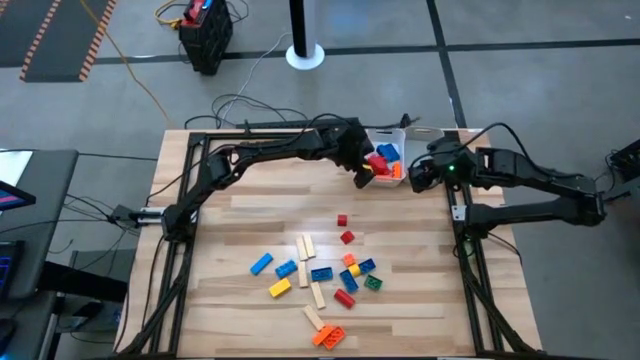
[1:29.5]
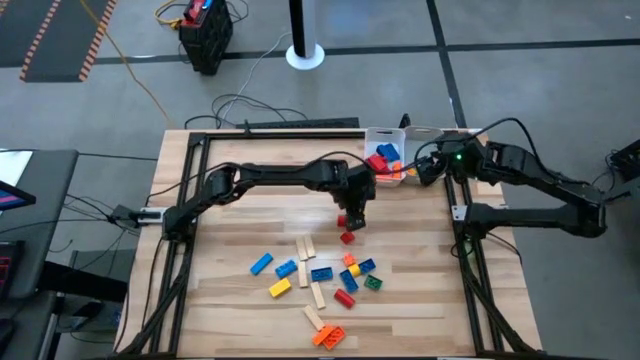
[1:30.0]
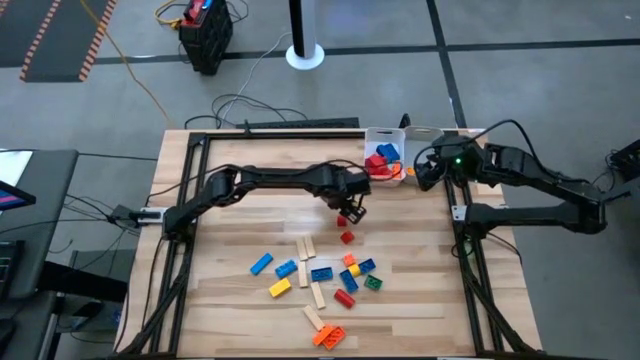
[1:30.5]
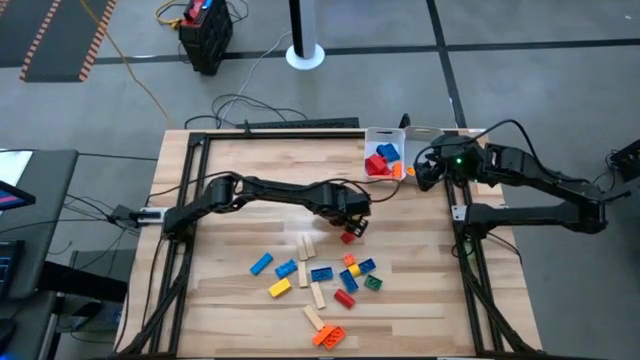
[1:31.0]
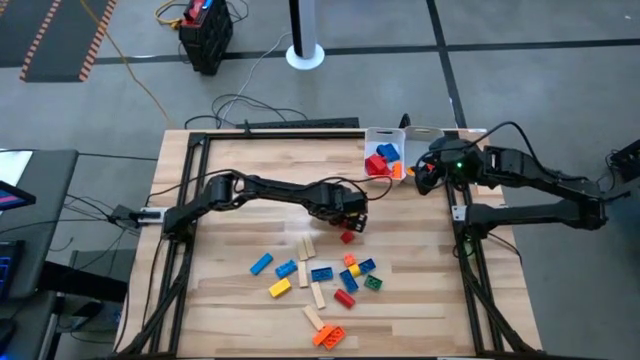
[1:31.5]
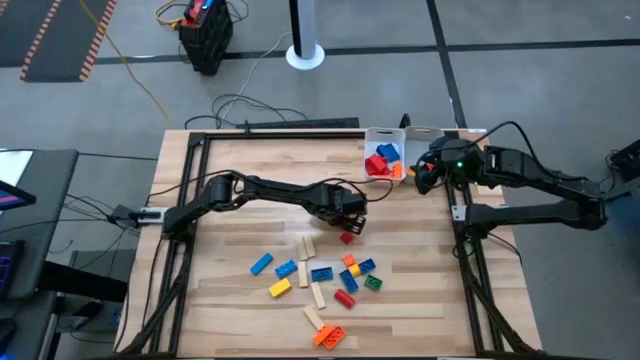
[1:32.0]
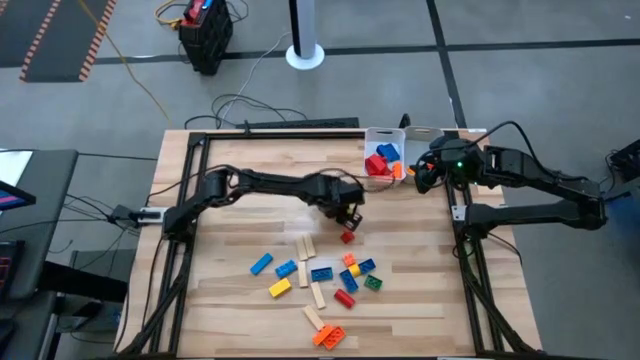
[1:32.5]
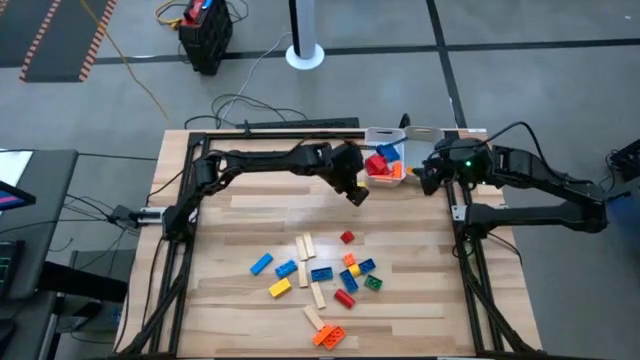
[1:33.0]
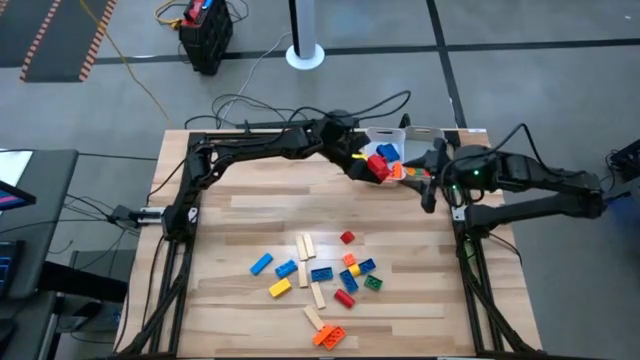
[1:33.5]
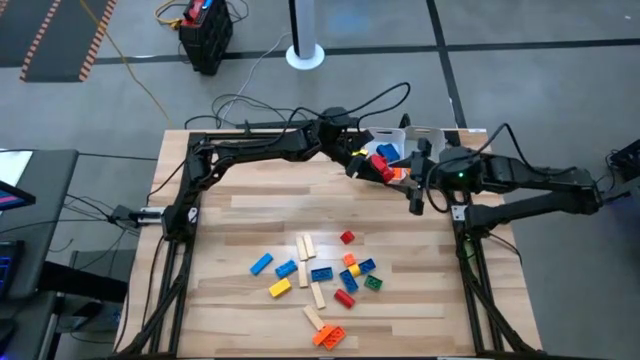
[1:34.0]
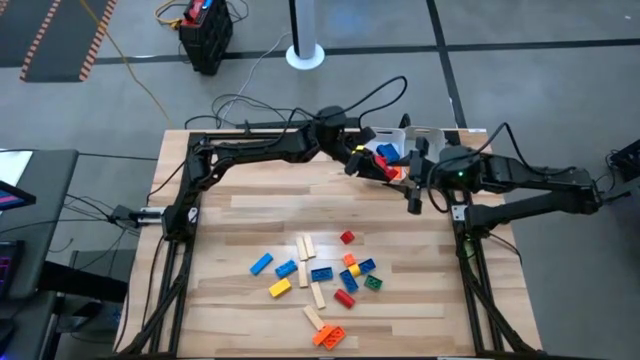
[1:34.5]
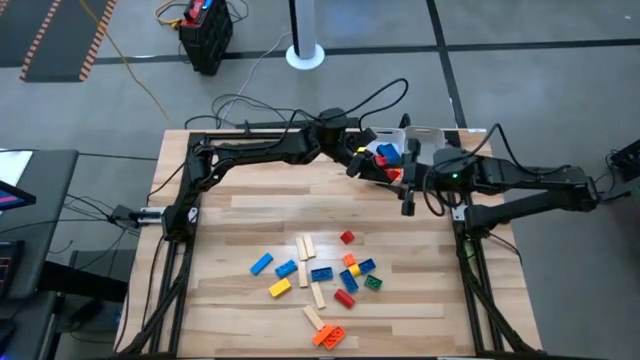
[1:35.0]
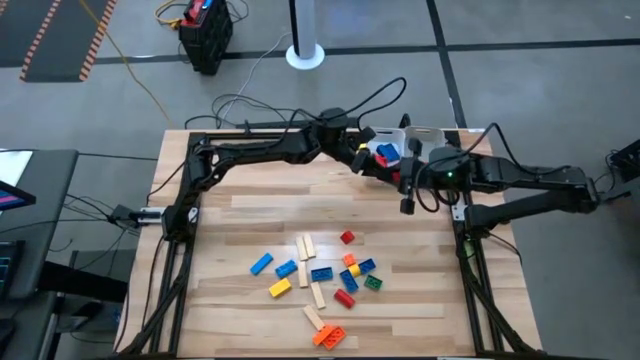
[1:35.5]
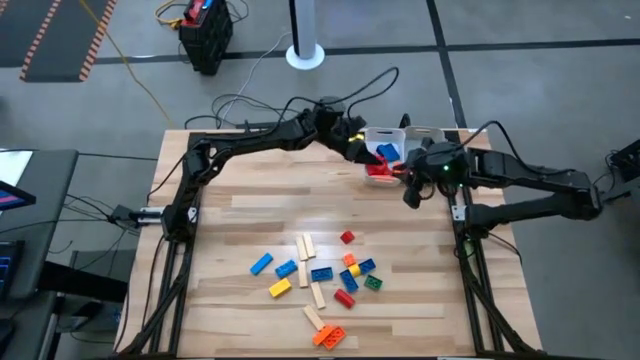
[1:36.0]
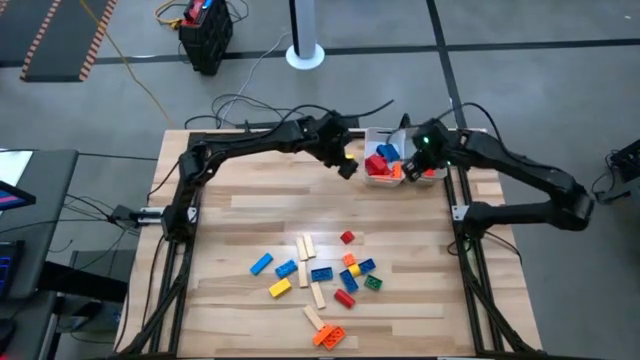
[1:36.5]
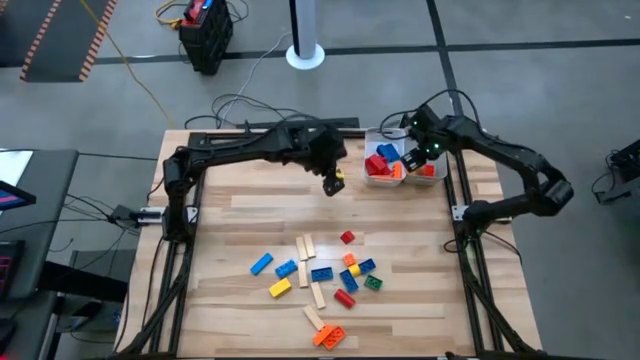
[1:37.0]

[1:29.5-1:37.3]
Task: Sort blocks by size
Put the small red semi circular wooden block into the gray bin

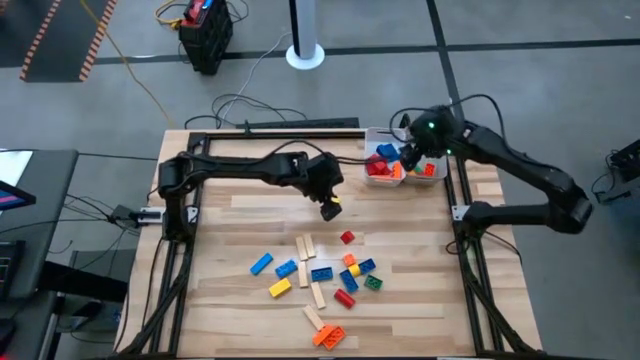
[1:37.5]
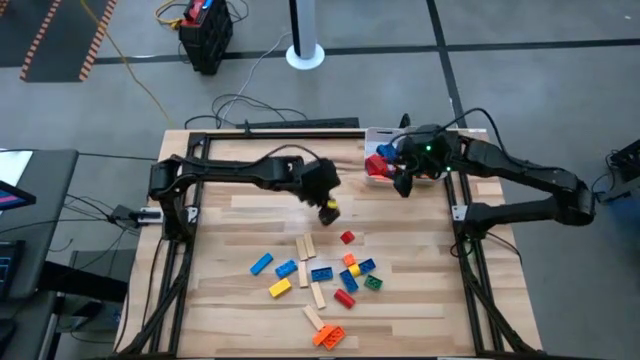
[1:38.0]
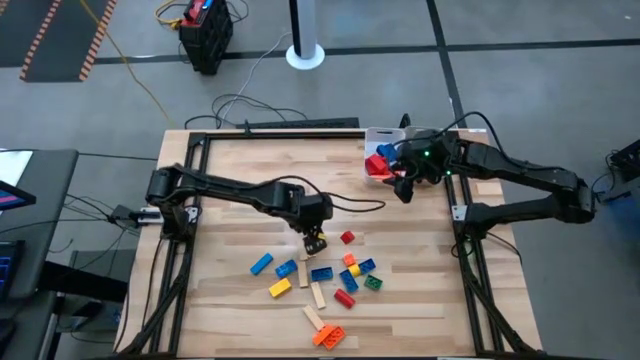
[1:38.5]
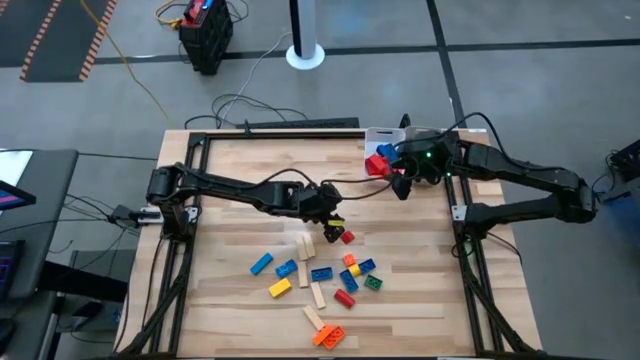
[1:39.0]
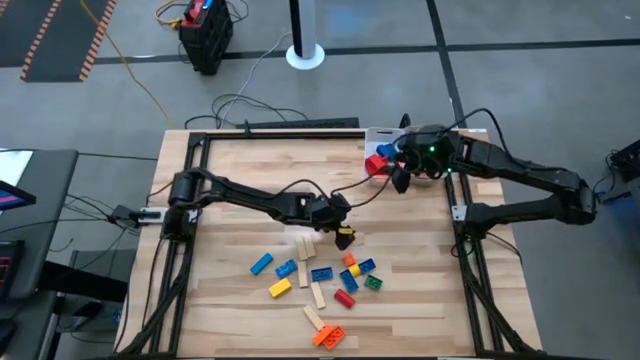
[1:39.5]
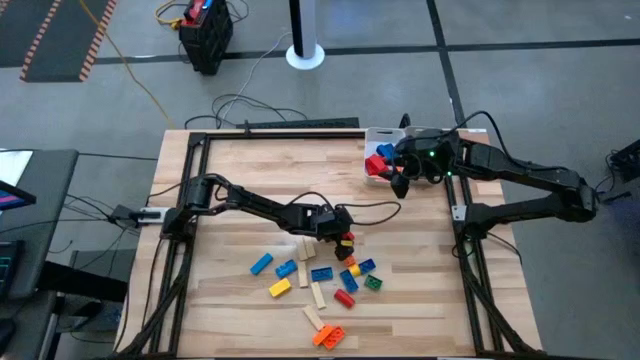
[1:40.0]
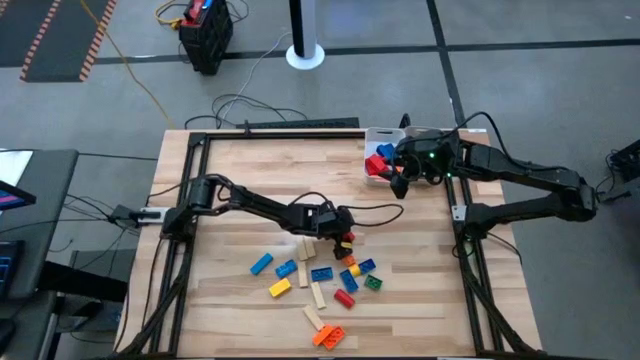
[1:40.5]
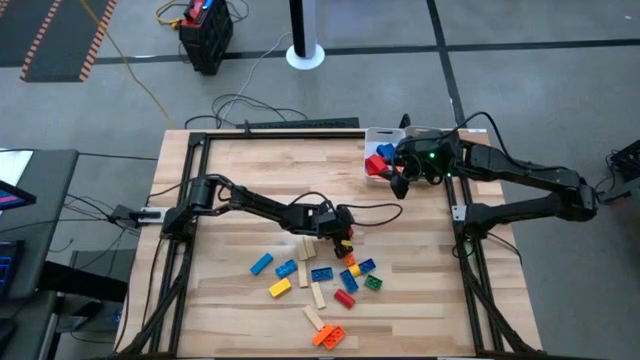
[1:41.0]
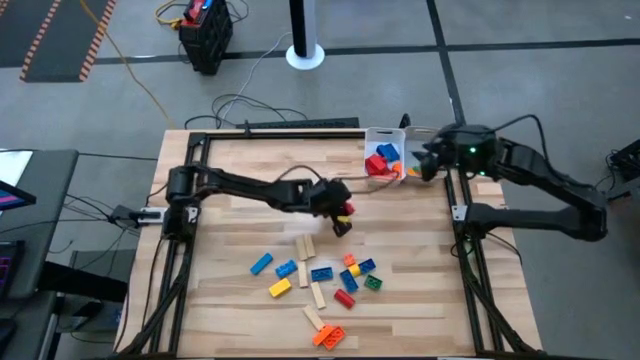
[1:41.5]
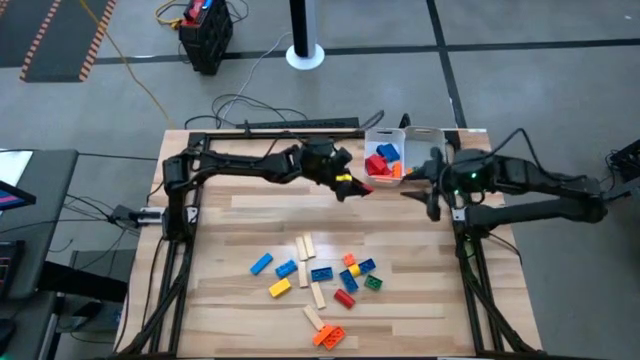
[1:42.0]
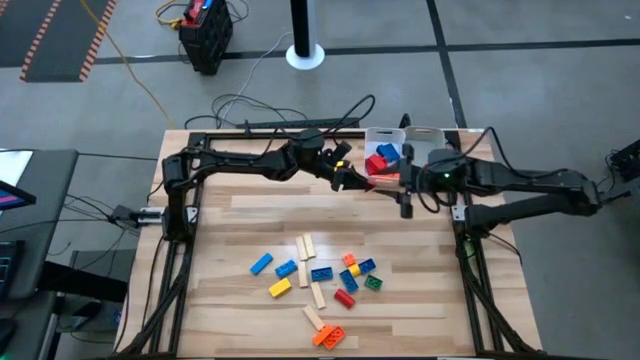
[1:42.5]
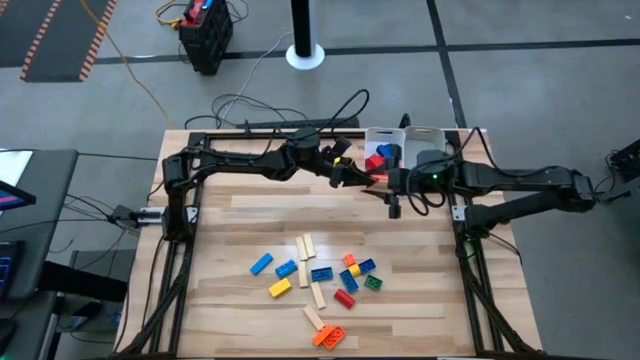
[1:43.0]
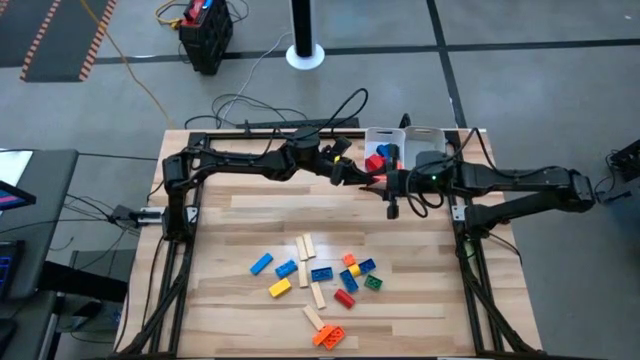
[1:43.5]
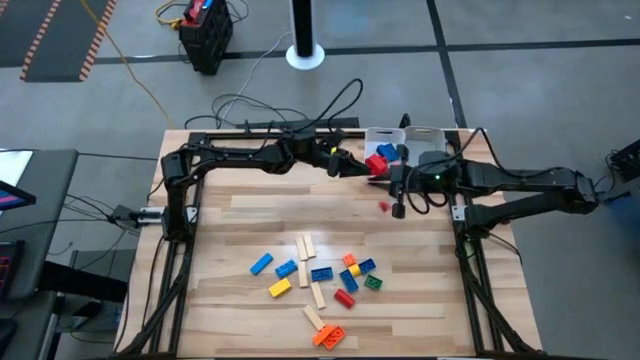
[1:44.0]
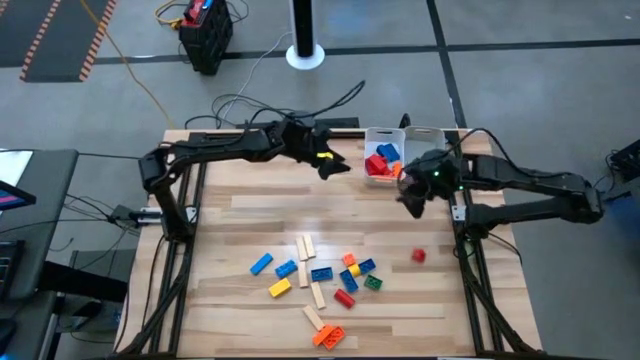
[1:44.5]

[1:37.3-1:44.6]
Put the small red triangular wooden block into the gray bin

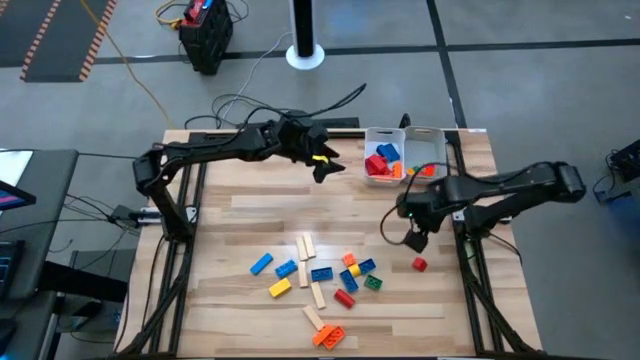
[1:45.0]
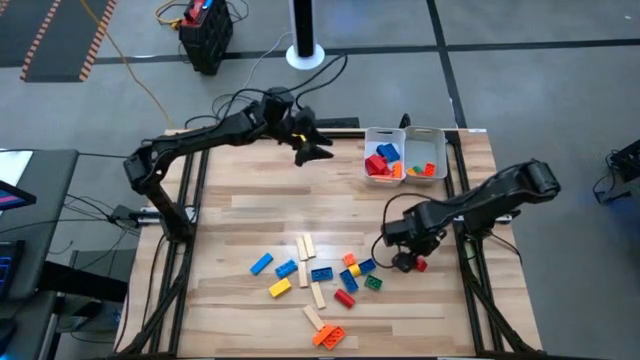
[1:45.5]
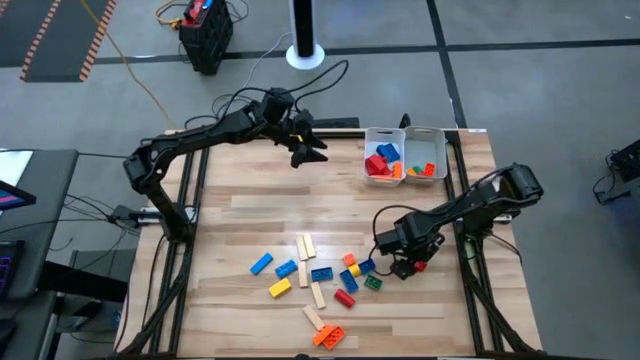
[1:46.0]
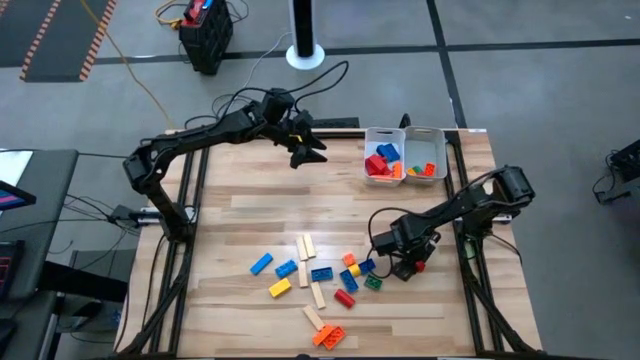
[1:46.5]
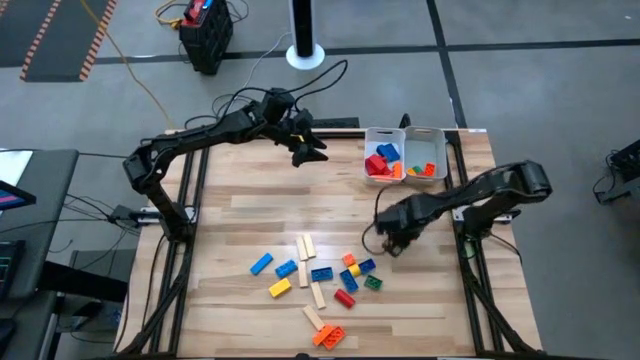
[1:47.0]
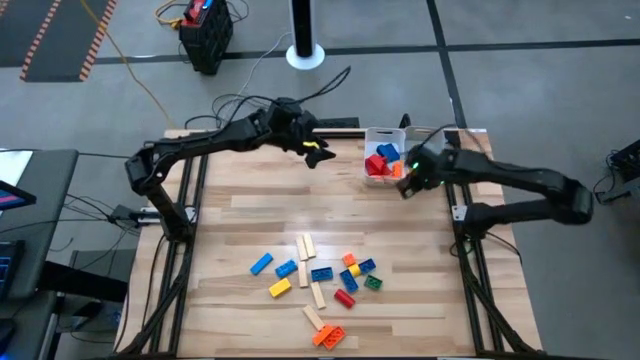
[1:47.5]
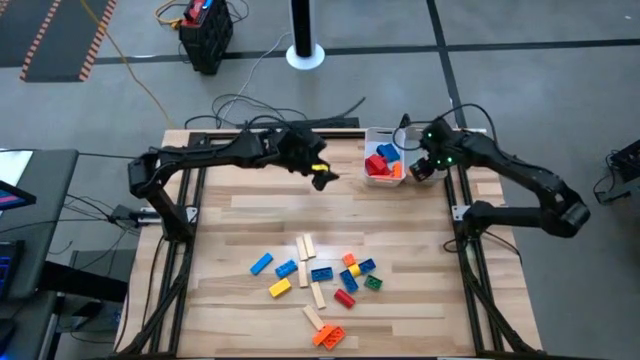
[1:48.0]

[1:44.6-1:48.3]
Put the small red triangular wooden block into the gray bin

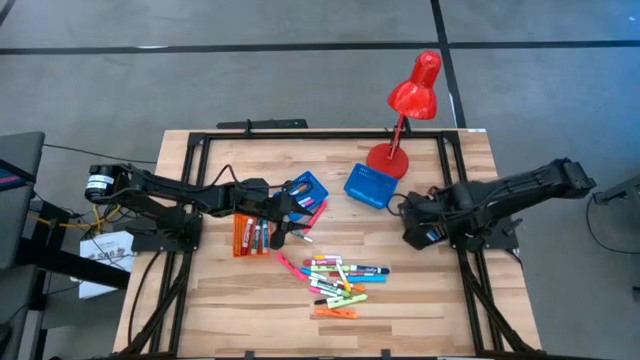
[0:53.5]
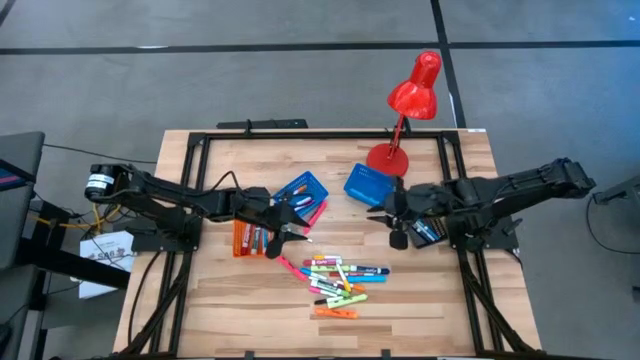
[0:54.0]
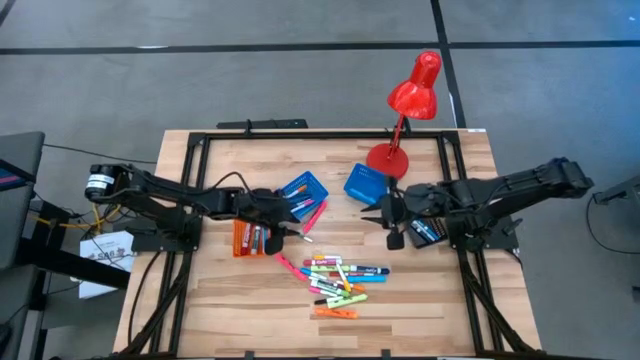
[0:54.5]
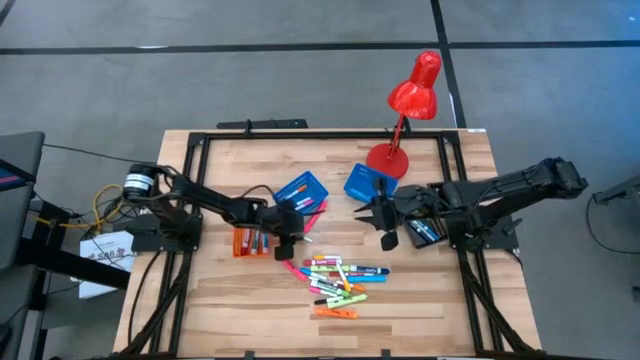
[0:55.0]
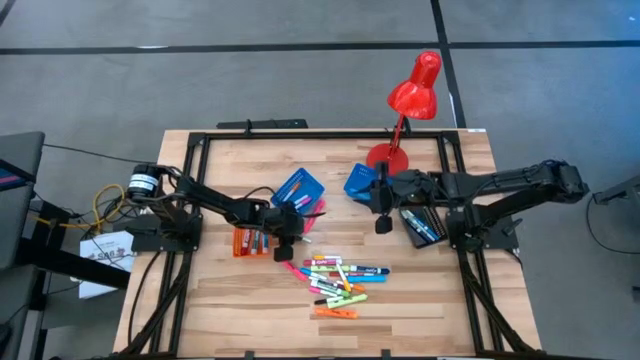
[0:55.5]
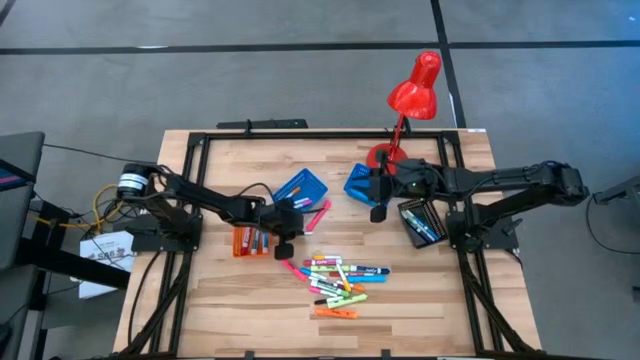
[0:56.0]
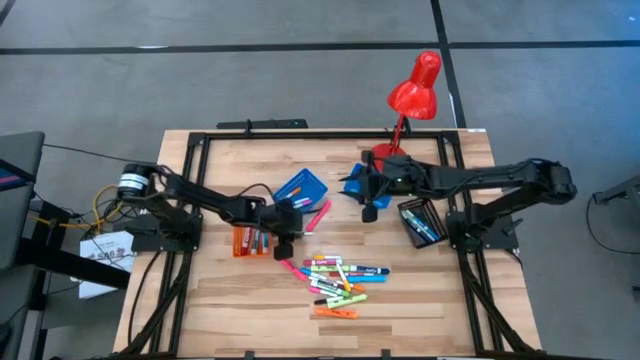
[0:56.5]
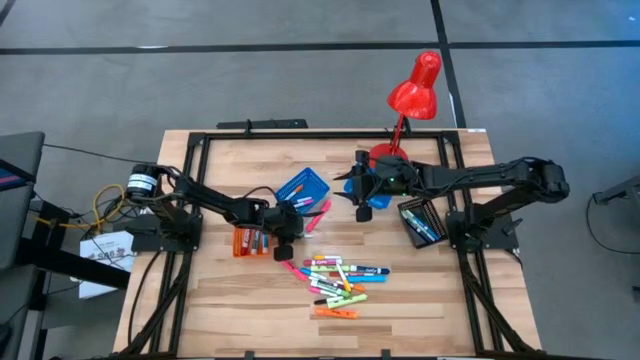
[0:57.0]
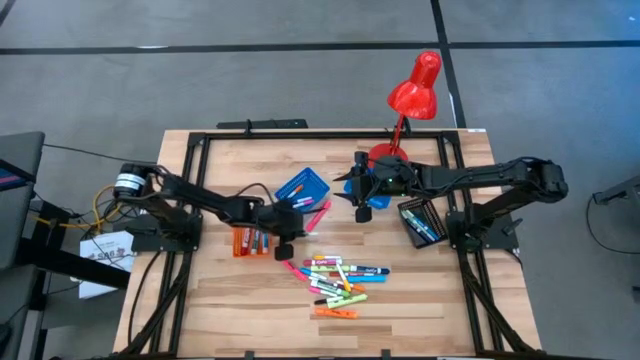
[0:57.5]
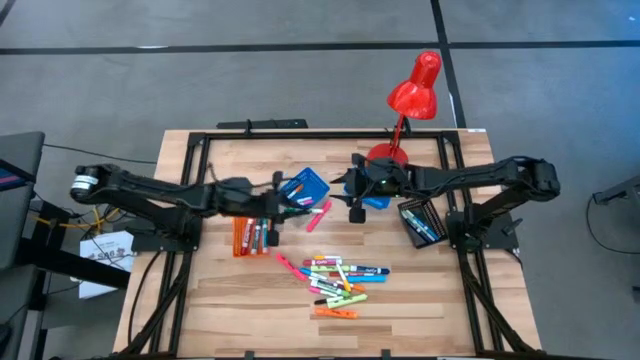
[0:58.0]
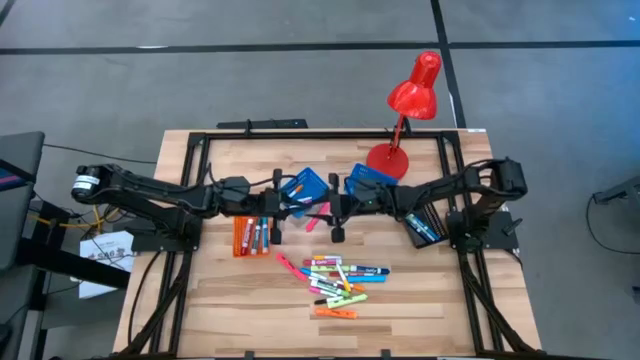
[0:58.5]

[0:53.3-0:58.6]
Task: Pick & Place Markers
Put the small dark green marker pen into the black bin
